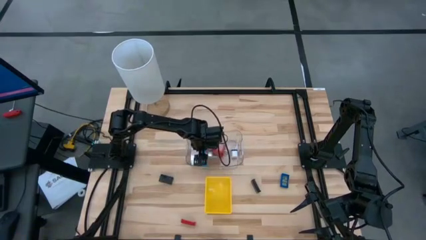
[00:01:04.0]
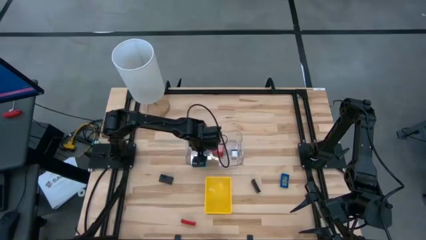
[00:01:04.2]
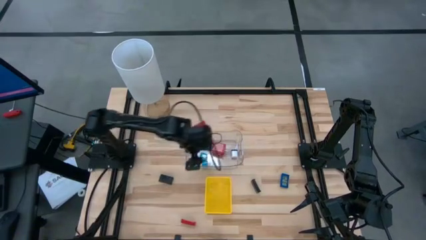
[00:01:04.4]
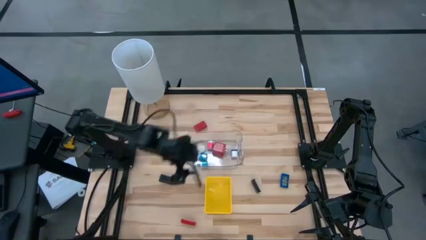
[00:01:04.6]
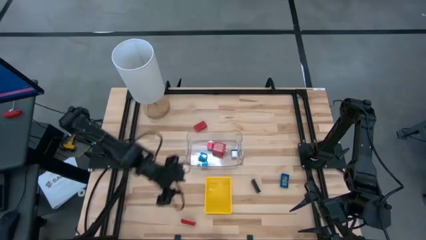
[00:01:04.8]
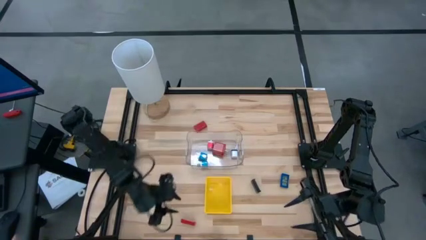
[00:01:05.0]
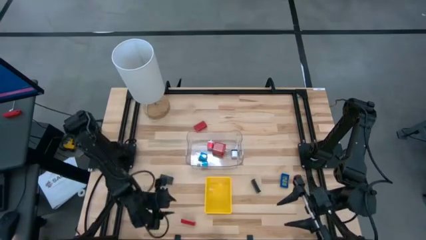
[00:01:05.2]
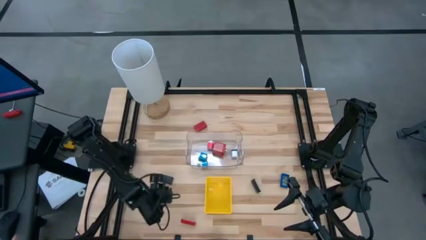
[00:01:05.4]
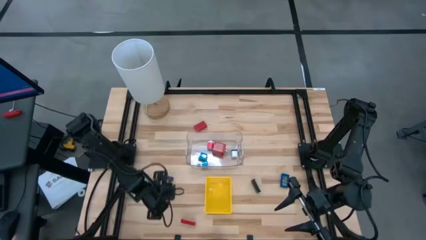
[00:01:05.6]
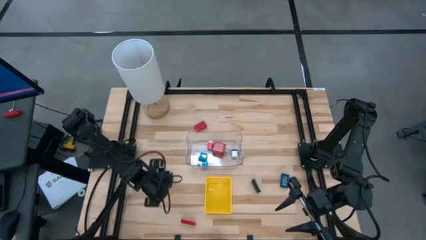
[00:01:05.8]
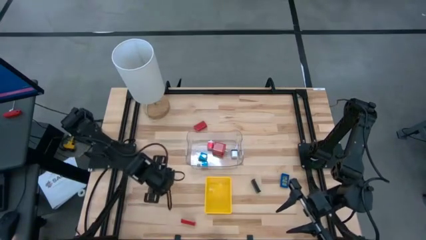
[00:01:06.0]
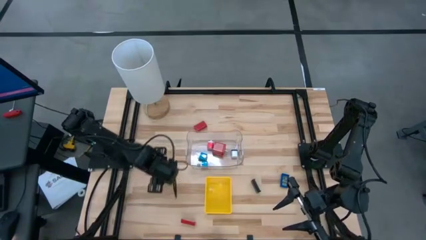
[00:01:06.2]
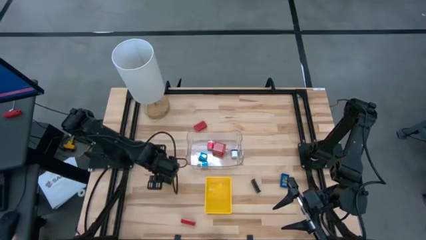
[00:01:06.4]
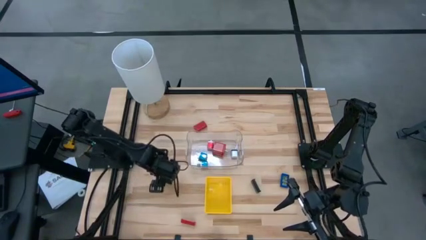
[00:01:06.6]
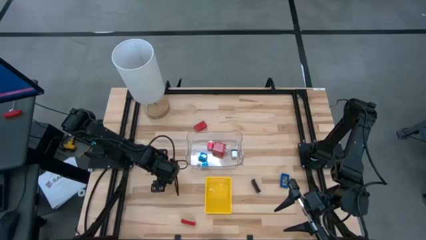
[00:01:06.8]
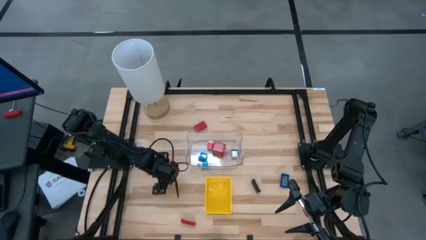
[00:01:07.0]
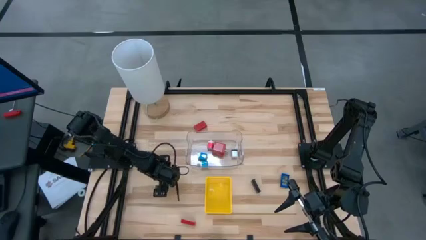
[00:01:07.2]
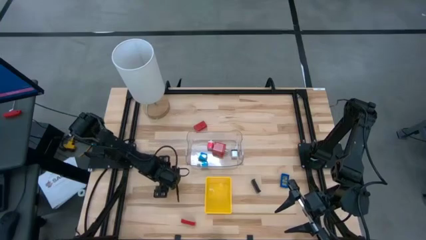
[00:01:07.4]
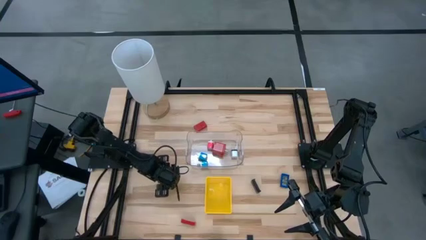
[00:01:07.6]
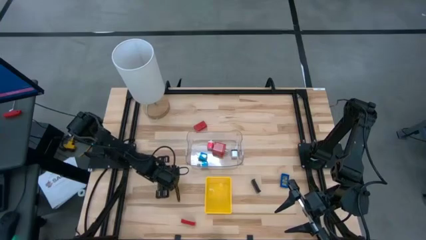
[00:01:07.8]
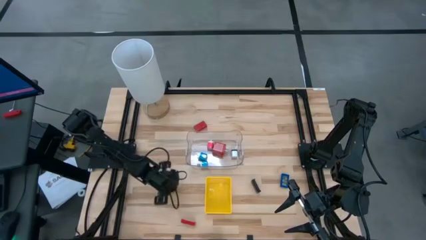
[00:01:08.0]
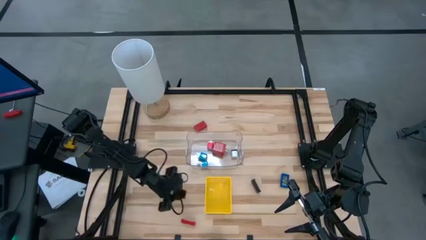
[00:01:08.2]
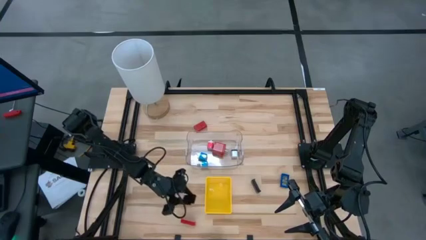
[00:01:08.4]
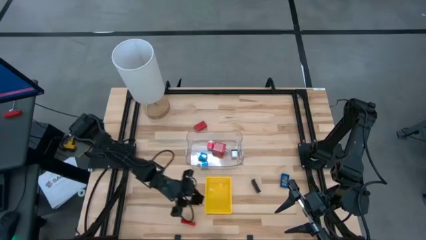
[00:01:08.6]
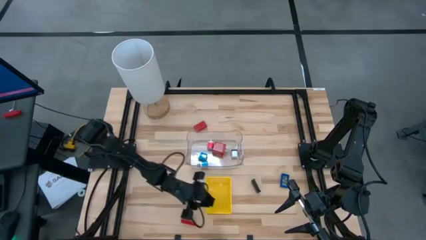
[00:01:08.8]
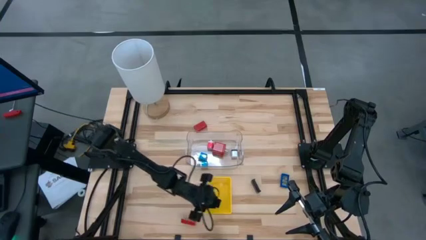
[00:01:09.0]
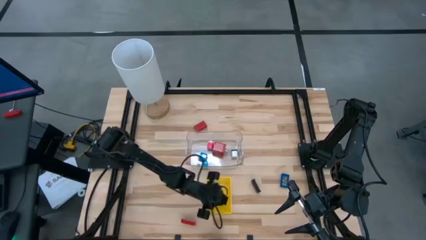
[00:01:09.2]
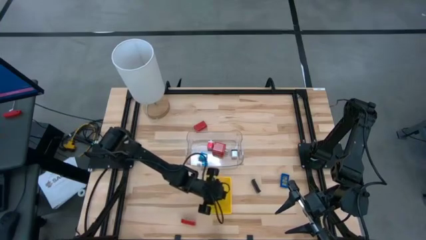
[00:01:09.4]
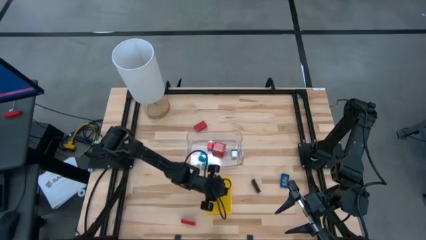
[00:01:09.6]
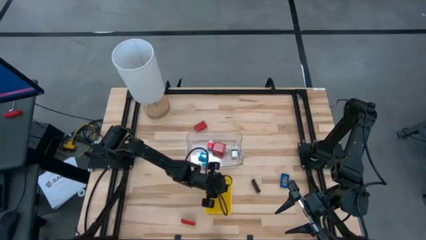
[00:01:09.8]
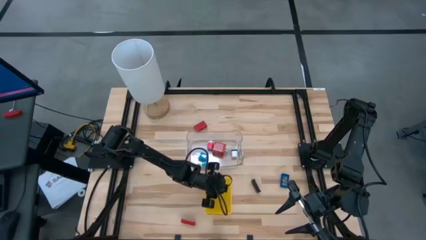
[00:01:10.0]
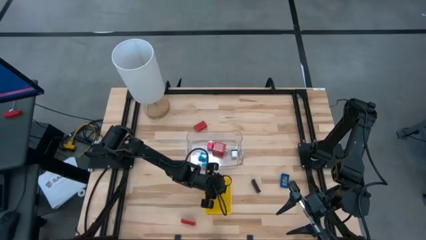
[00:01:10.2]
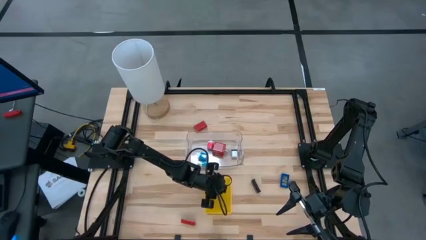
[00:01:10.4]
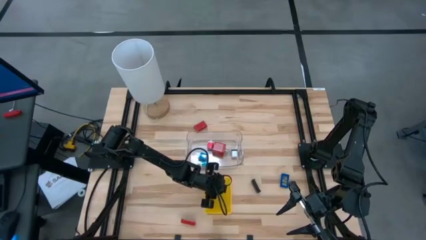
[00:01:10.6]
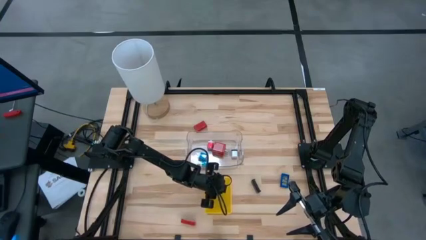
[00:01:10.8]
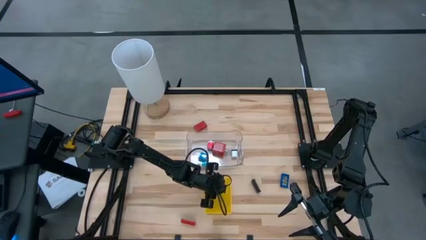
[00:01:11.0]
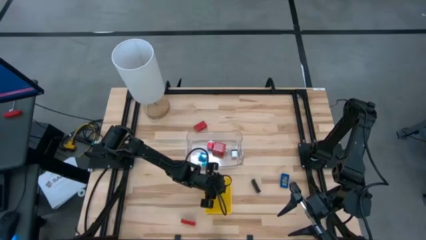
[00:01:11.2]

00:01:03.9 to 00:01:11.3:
Task: Pick & Place Office items
Put the left black digital clock into the yellow bin

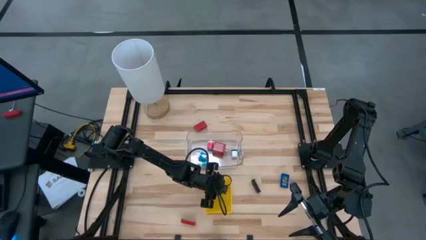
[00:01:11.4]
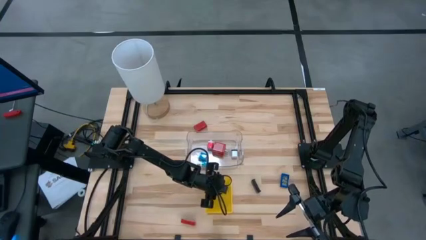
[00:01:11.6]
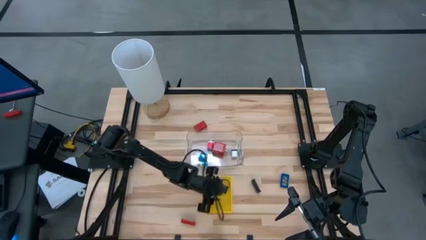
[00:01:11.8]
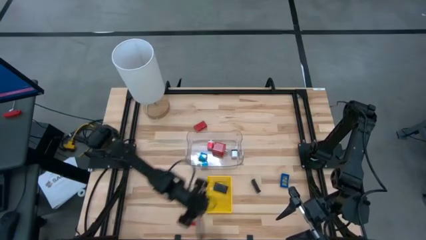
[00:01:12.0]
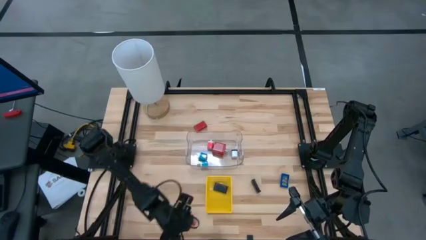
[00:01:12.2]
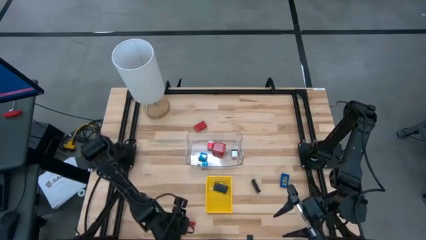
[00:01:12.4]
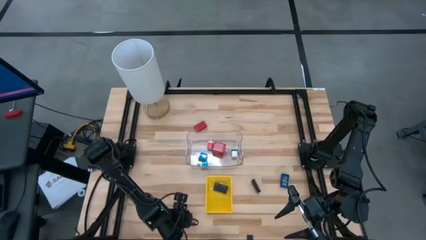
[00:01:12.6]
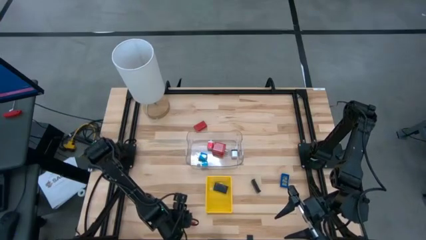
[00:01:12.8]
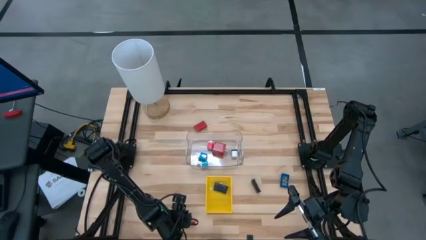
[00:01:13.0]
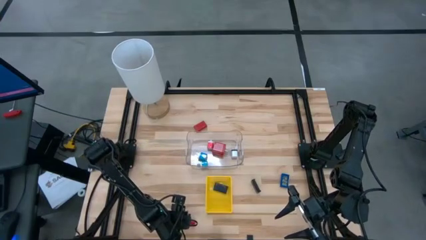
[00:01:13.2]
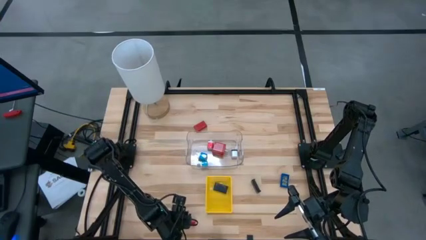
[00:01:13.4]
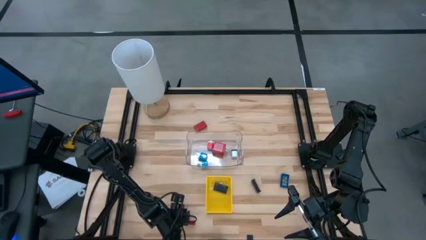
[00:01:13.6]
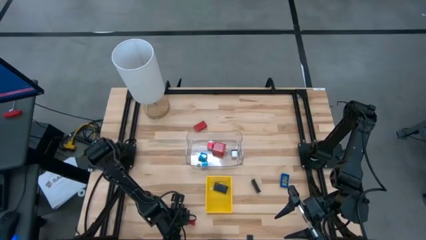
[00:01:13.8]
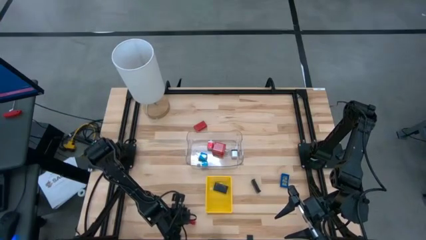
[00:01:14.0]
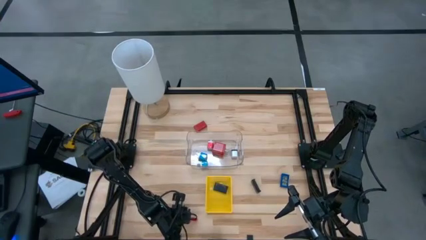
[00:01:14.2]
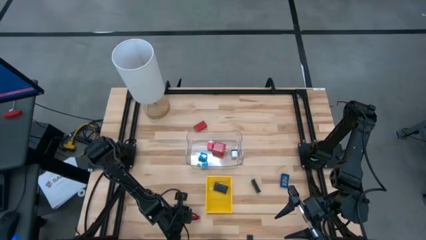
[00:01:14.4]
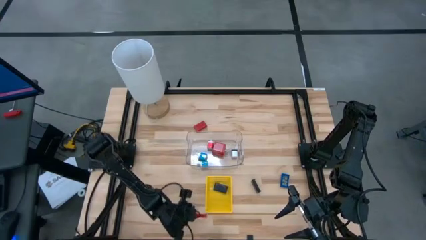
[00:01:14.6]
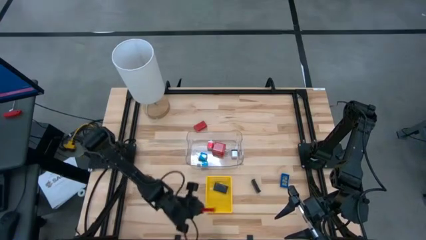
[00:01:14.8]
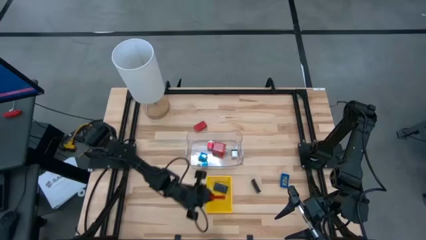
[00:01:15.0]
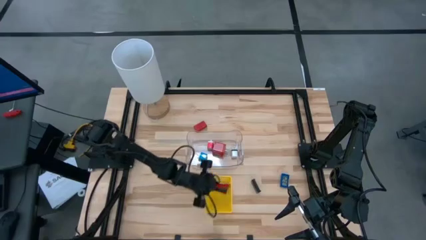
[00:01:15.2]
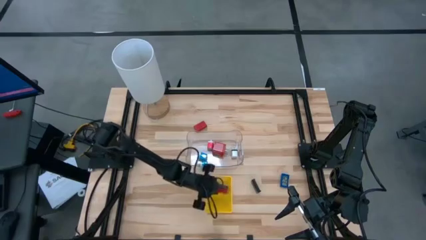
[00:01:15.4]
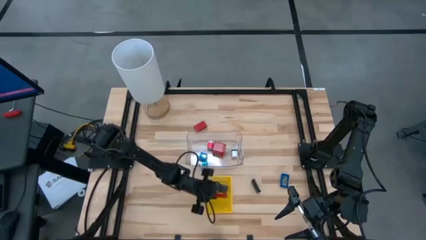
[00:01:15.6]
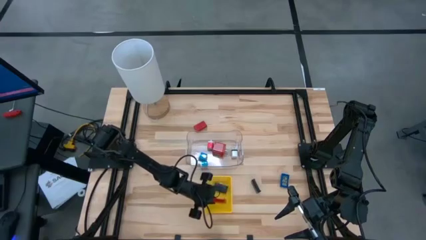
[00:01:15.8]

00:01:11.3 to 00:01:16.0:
Put the bottom red digital clock into the yellow bin
